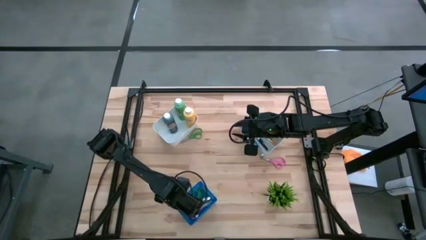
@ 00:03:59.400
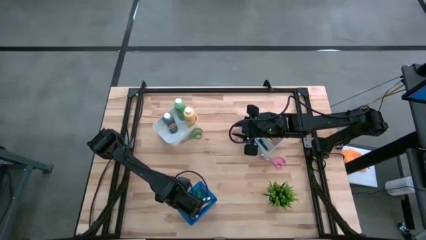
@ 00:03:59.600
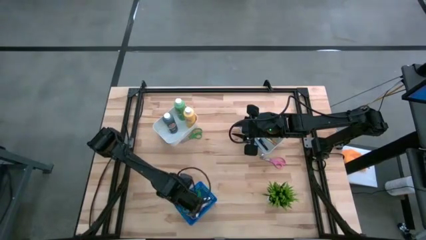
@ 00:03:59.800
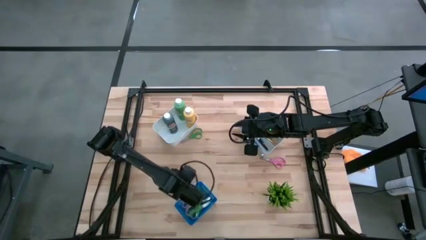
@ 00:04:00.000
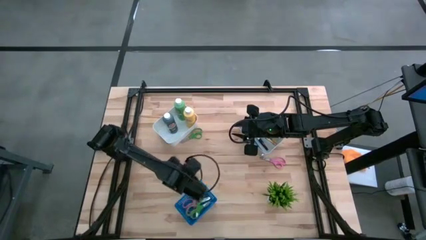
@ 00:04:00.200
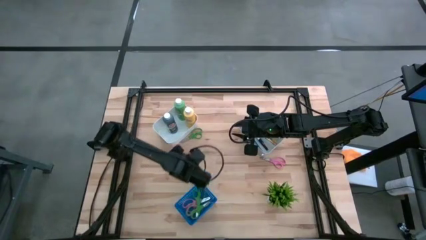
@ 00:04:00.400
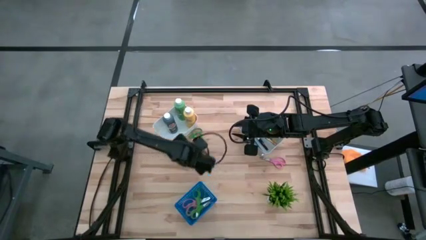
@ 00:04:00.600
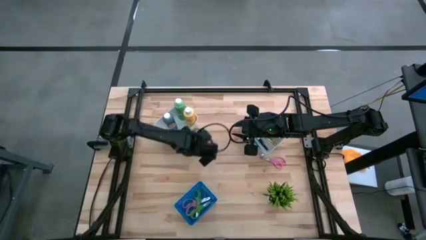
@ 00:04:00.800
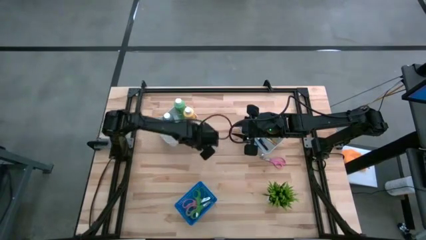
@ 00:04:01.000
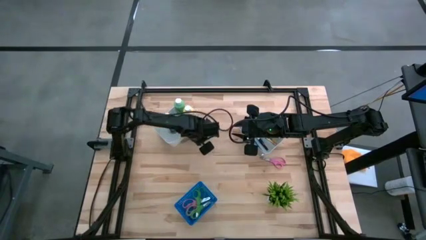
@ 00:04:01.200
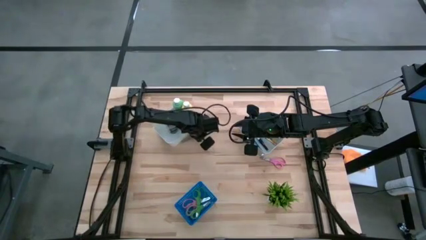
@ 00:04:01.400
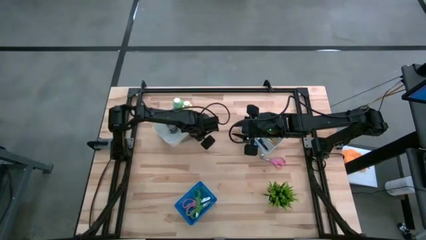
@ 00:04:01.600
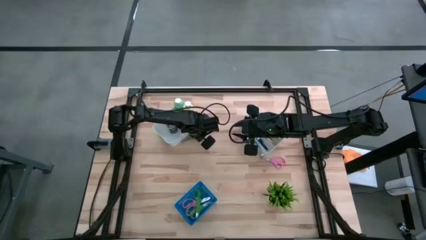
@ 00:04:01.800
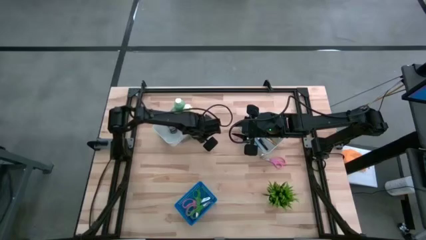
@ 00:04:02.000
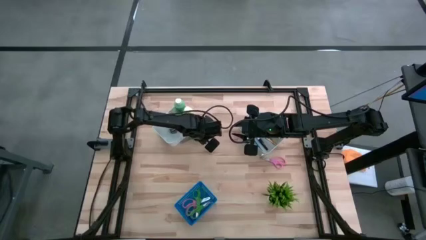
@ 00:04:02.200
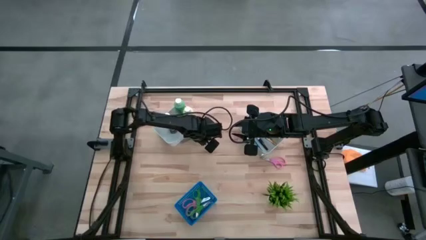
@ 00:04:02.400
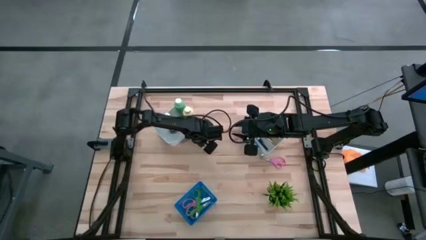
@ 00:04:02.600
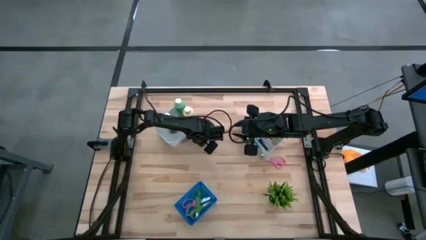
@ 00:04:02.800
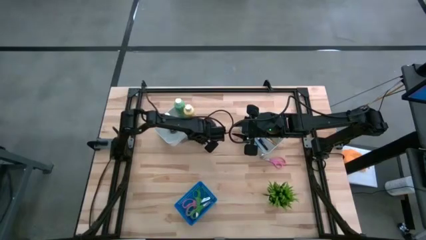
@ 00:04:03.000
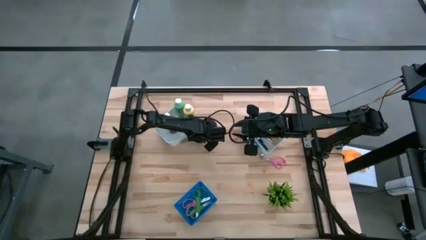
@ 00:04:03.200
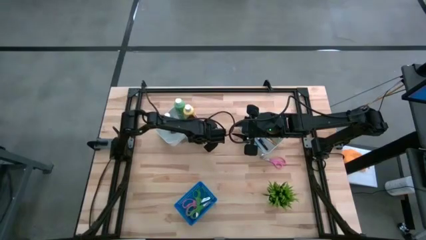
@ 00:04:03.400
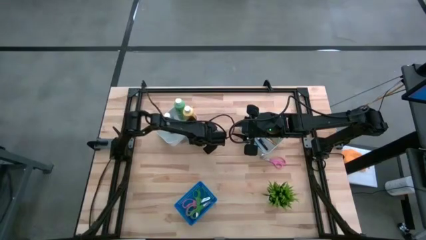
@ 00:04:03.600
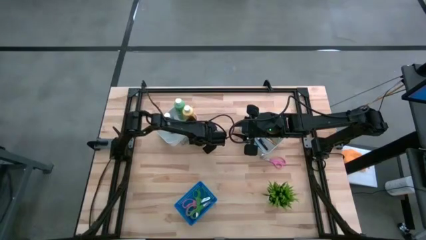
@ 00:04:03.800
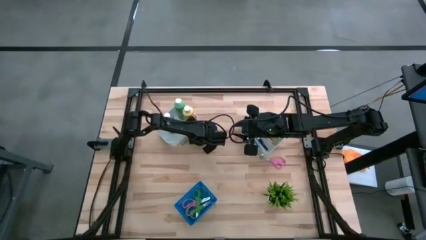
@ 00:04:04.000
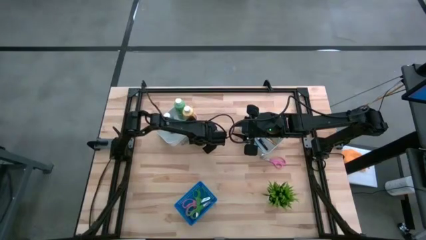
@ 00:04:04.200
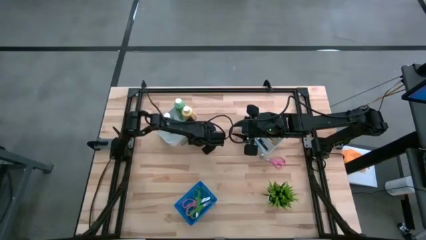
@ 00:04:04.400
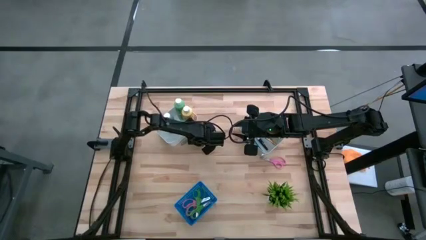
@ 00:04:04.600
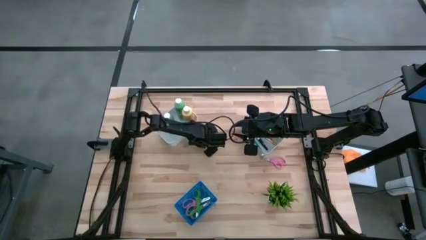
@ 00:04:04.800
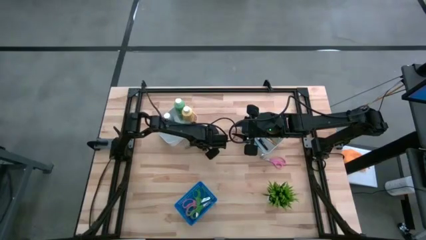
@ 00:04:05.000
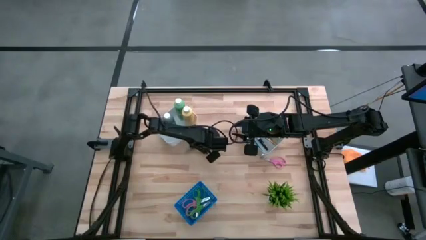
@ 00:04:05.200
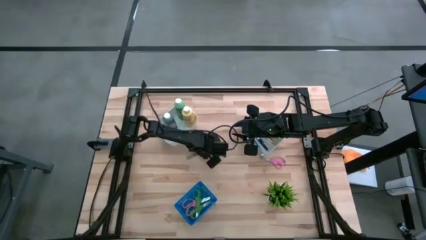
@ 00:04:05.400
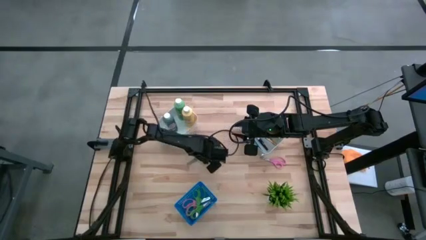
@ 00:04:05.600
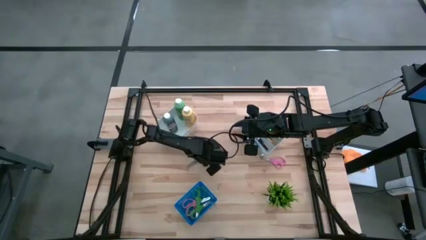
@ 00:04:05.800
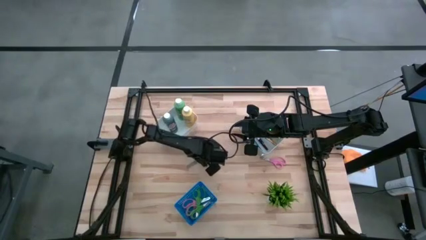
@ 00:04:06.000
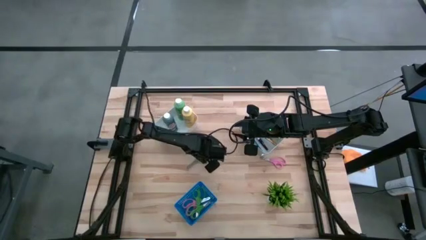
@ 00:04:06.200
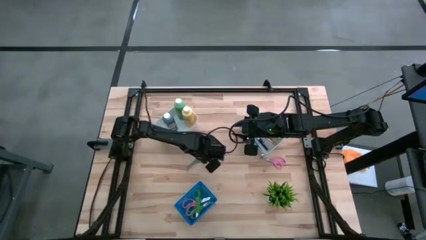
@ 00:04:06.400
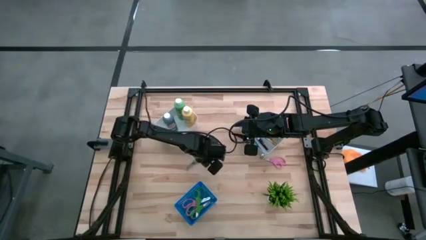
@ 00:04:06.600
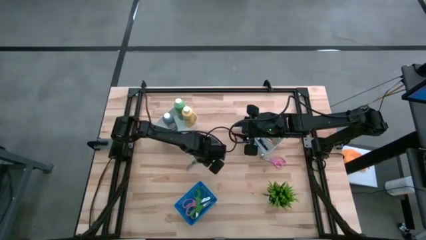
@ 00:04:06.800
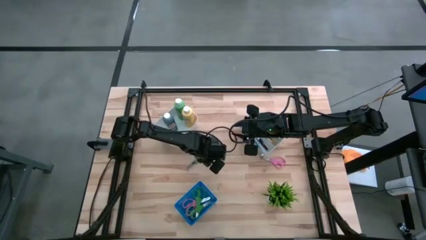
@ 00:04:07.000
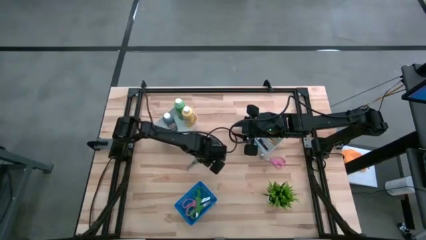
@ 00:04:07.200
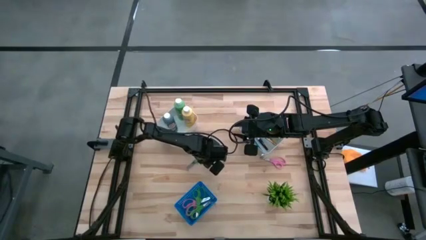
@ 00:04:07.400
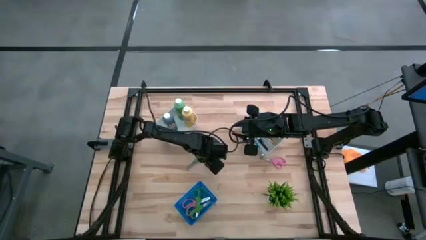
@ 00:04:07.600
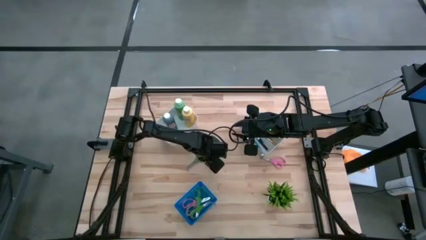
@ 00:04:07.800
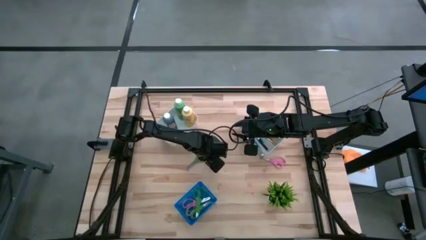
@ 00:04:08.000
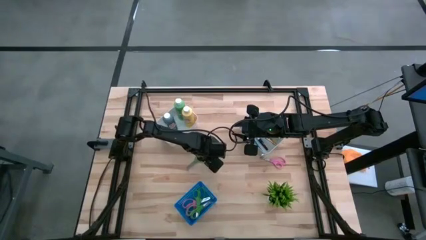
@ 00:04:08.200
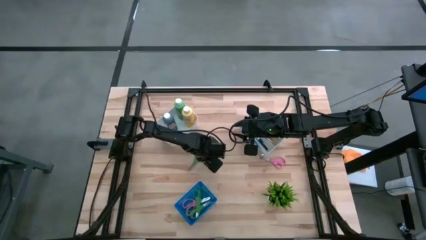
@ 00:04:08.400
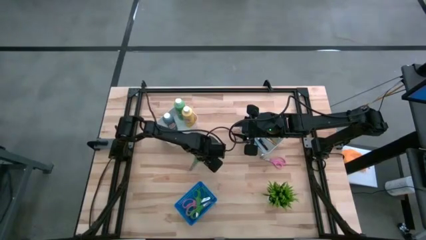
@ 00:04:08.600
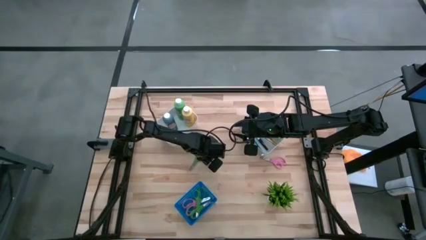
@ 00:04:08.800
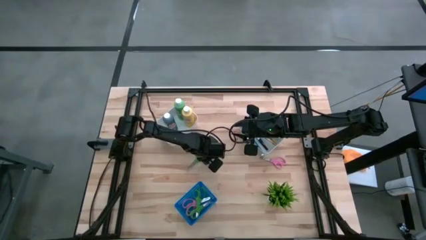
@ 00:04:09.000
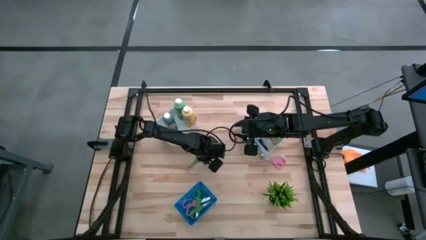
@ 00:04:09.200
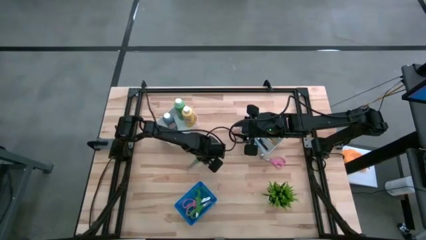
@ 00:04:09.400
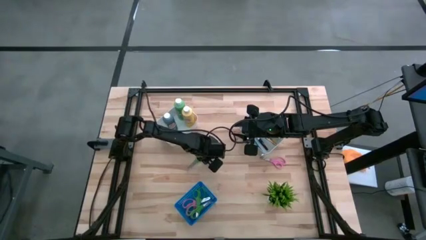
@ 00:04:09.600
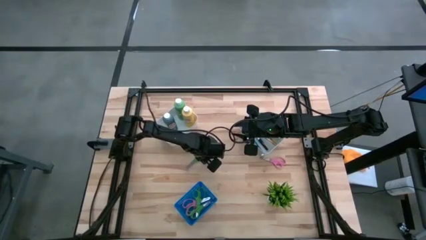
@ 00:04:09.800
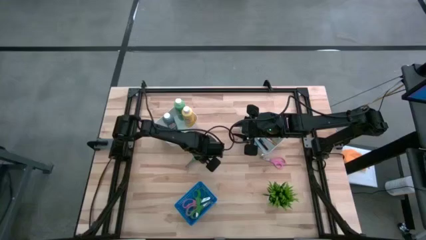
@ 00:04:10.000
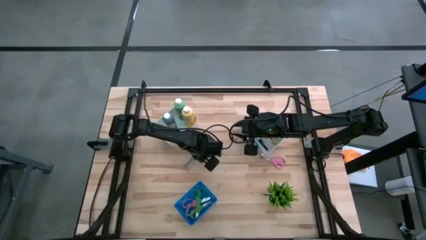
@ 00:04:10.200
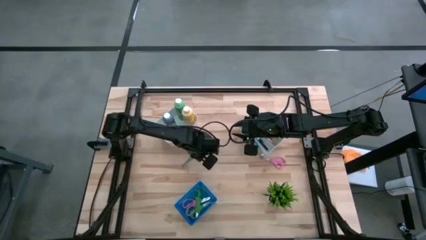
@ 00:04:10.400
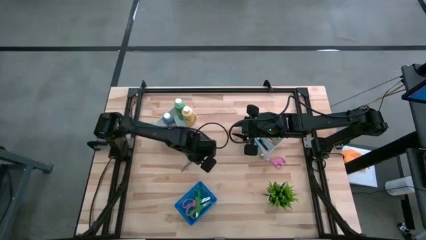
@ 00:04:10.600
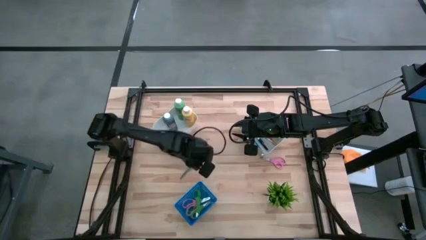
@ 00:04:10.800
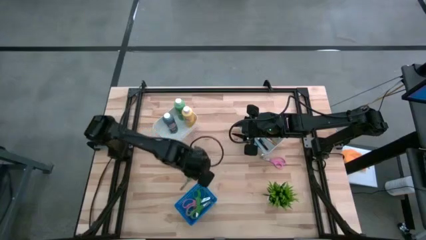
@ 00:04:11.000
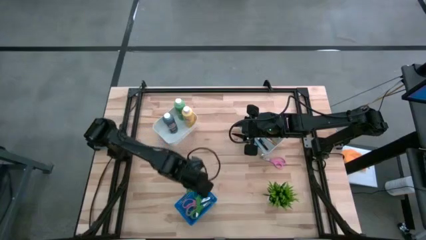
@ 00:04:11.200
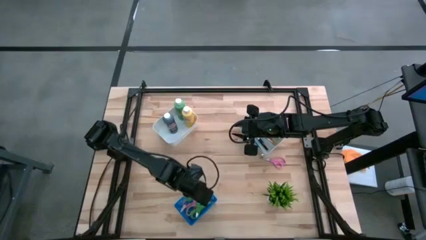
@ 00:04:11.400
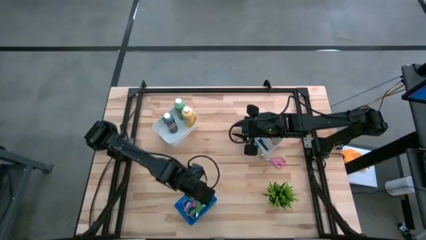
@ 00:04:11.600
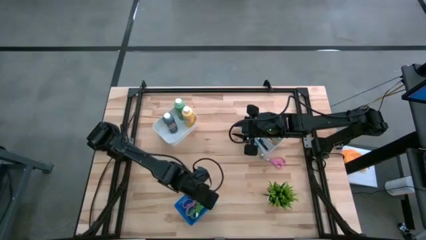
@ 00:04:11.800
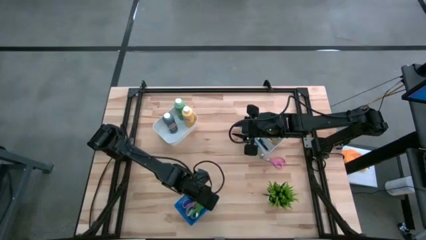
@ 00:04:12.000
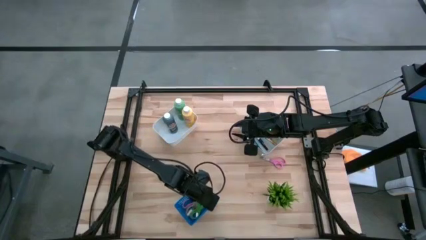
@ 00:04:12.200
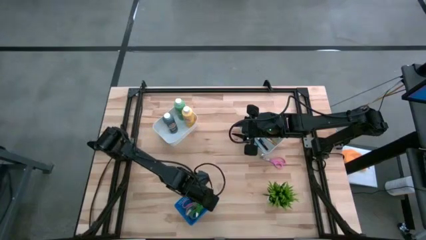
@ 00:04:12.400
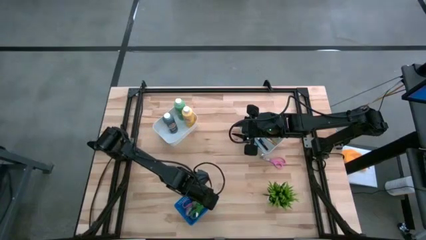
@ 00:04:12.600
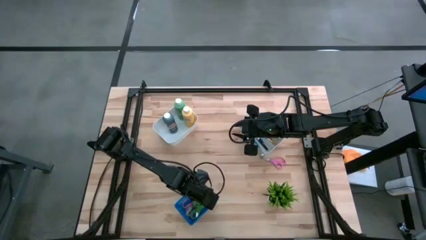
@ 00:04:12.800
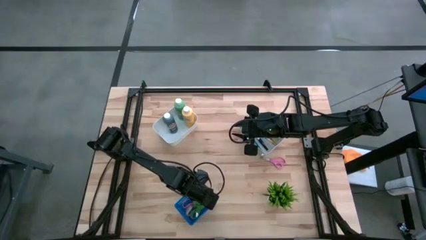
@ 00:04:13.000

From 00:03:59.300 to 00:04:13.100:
Task: Pick & Place Paint Supplies
Put the green scissors into the blue bin
